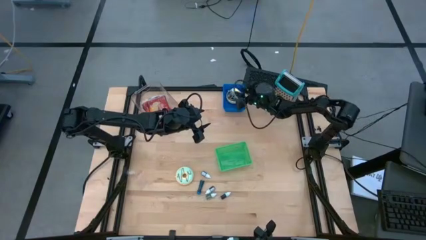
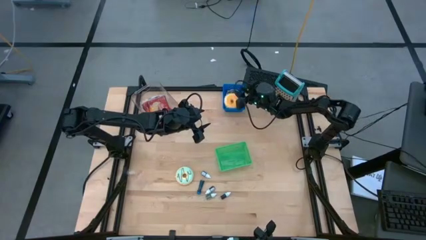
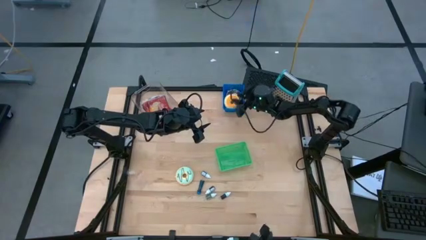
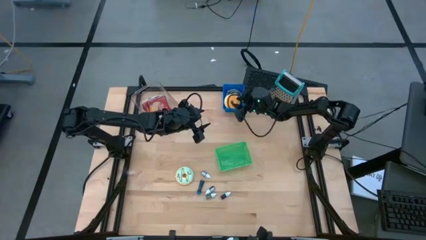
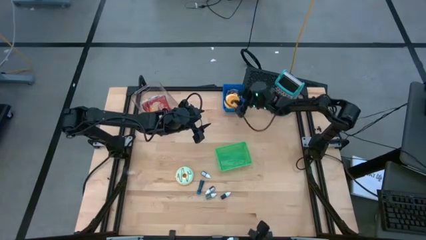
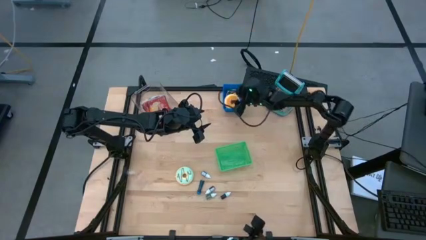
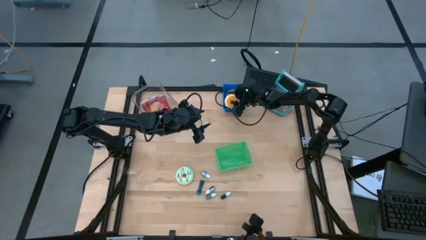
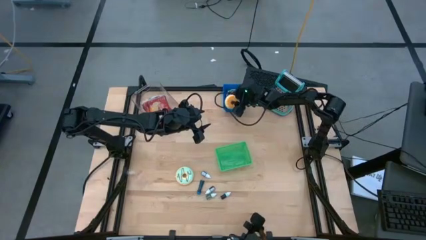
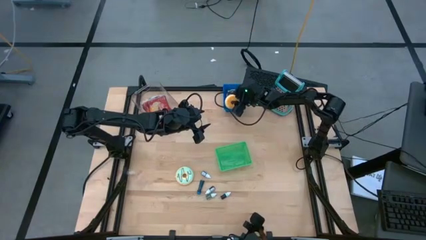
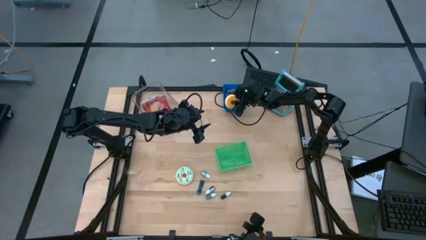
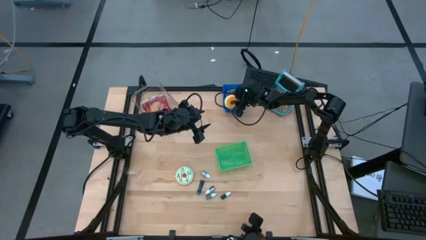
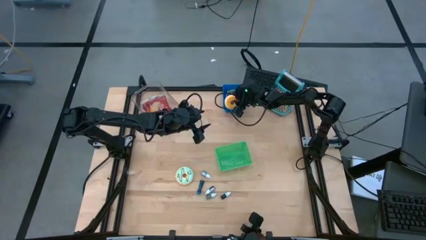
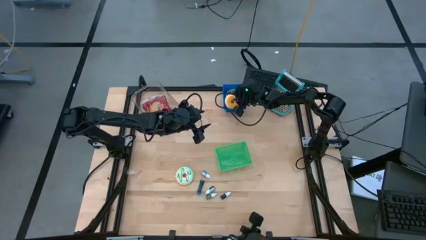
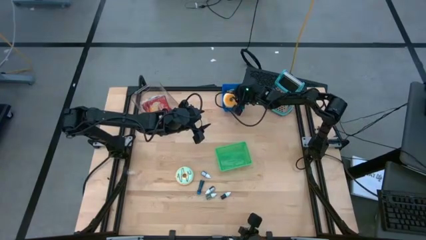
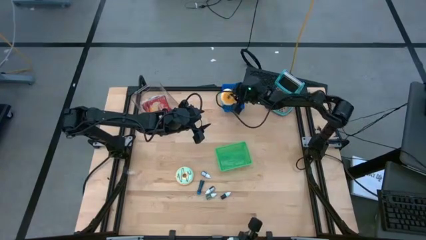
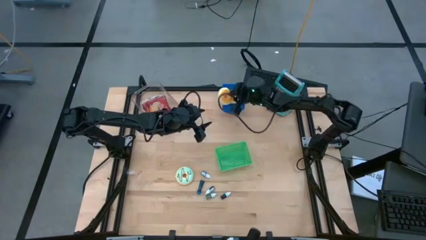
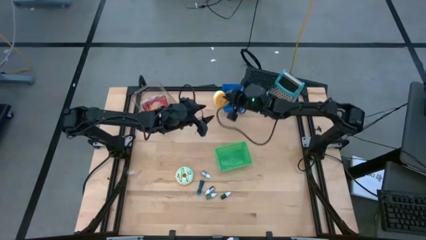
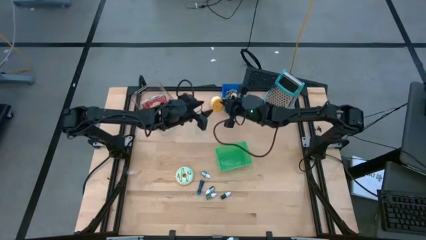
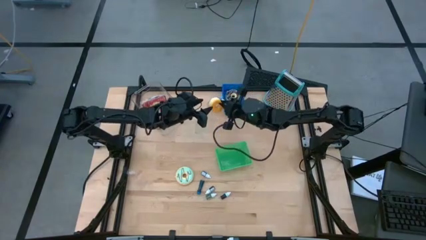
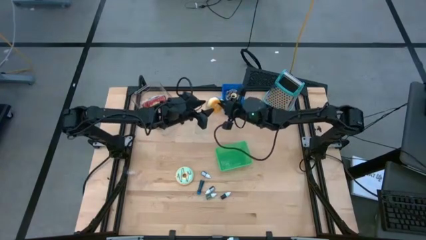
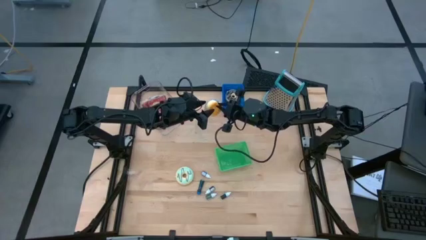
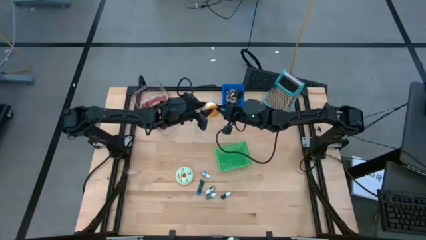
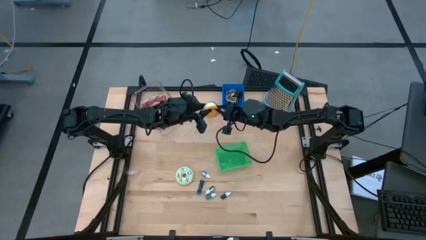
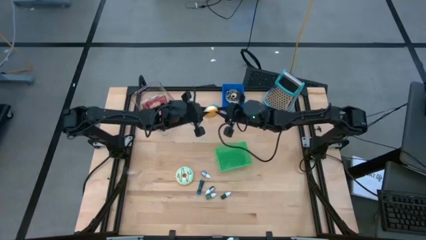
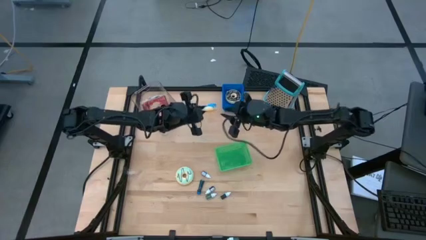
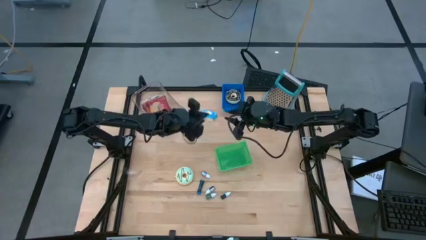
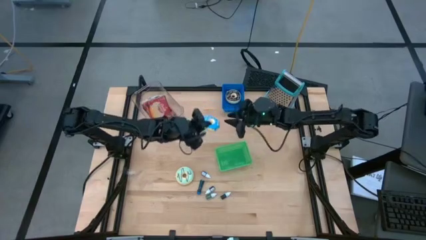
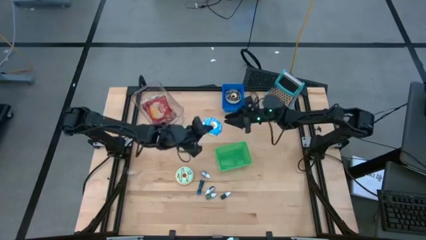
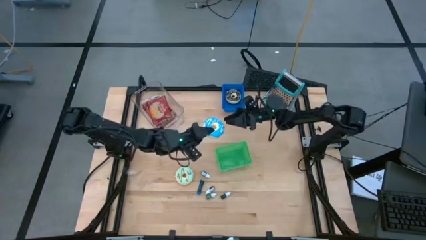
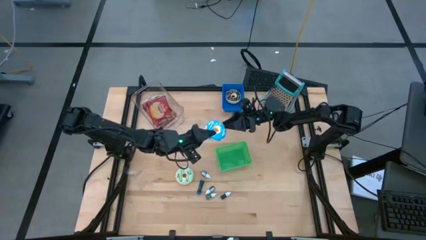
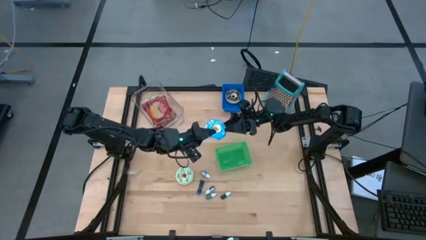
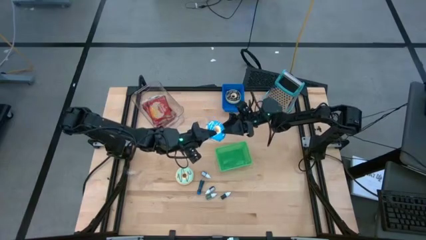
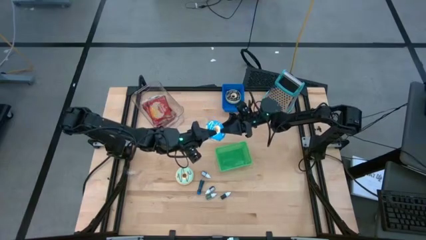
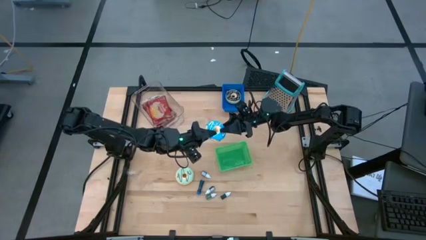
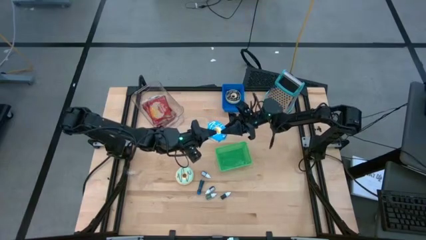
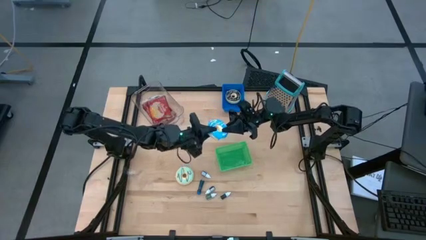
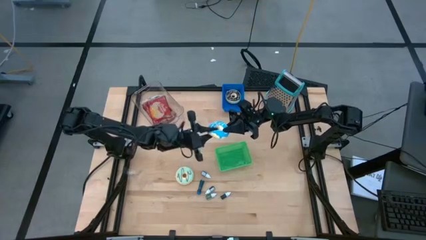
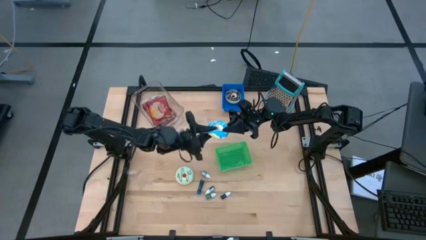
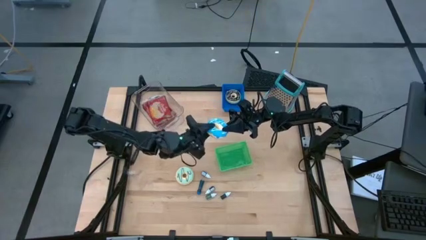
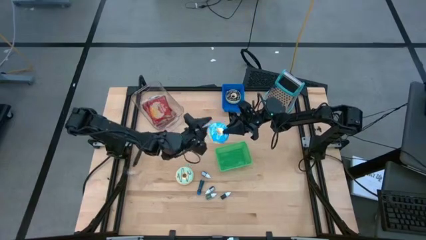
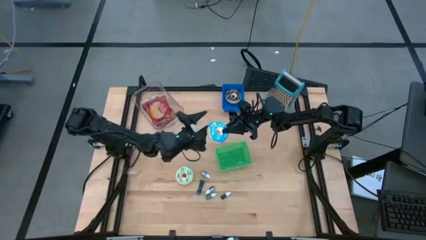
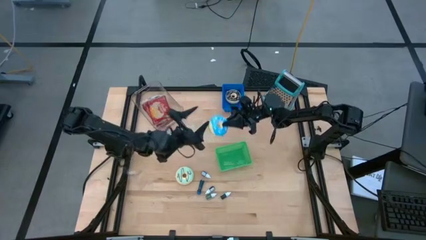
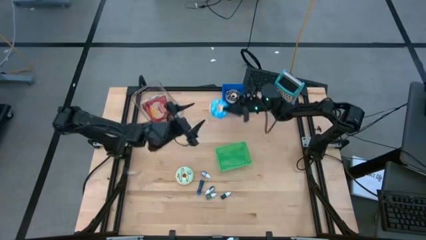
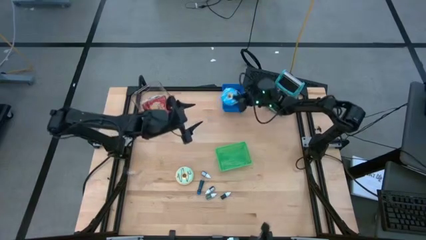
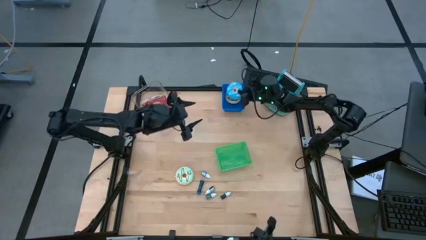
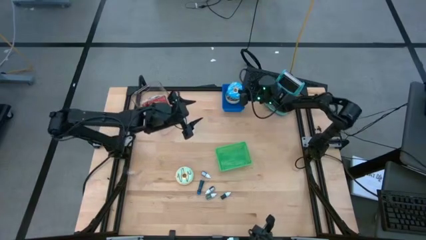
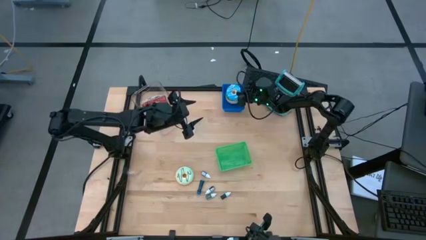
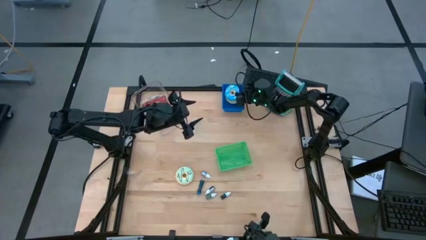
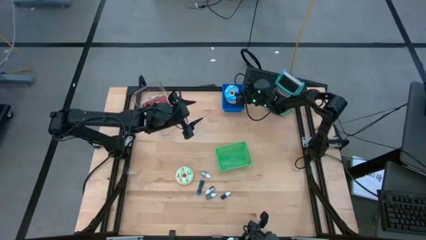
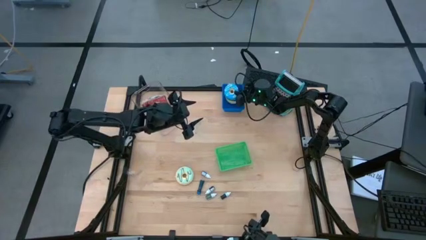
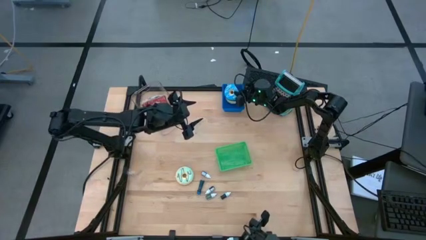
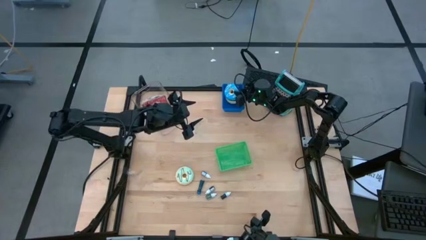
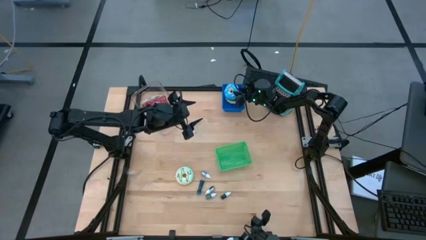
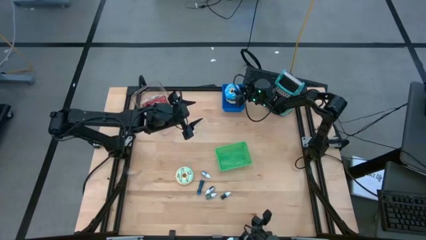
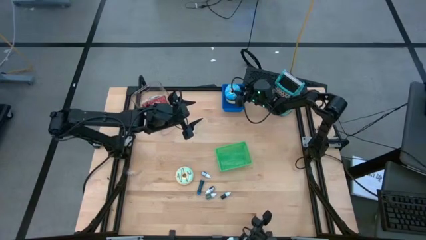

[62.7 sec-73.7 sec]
Put the blue donut into the blue bin

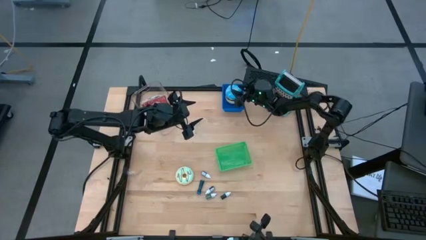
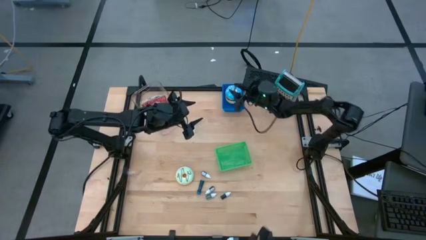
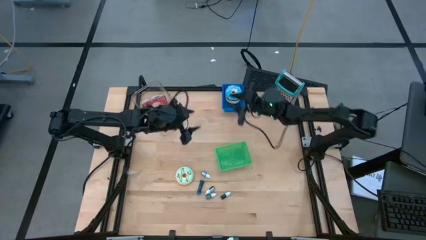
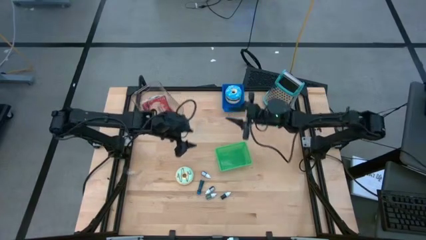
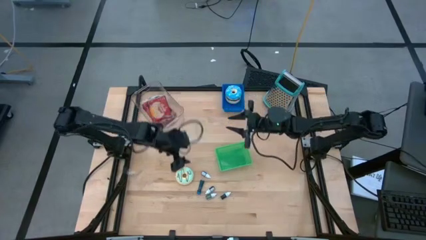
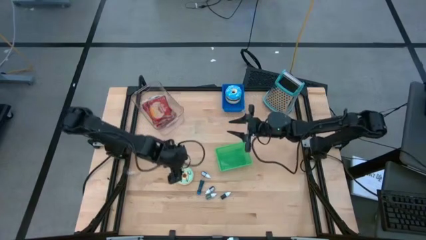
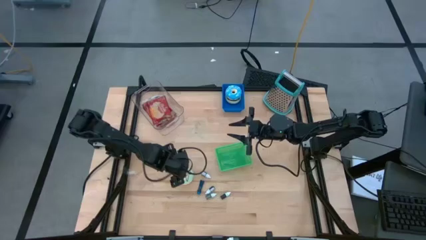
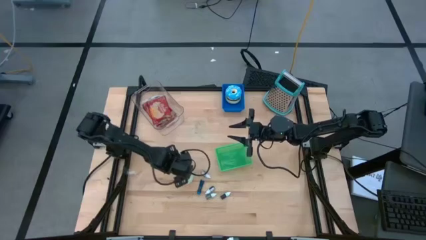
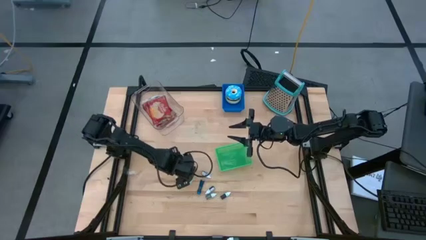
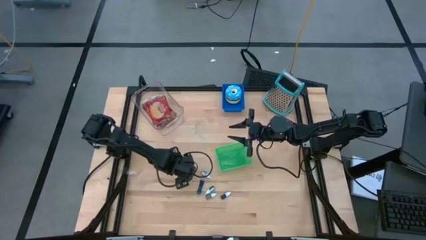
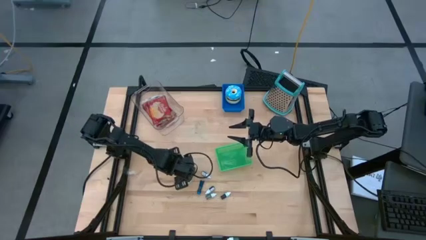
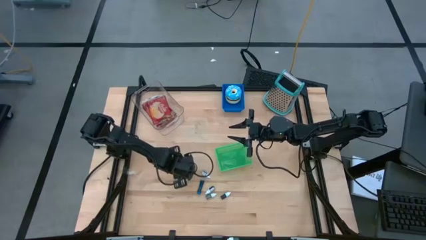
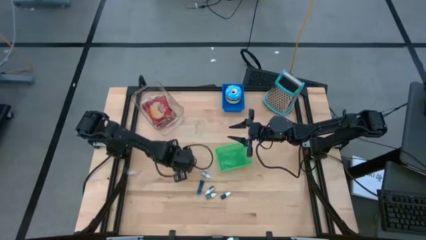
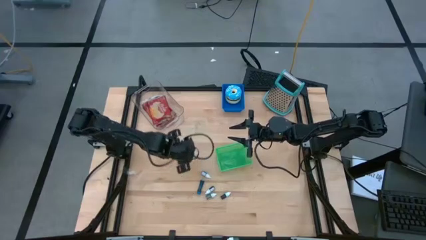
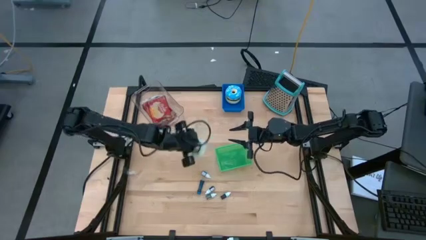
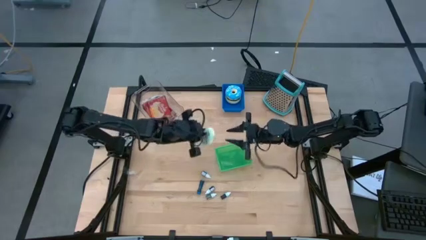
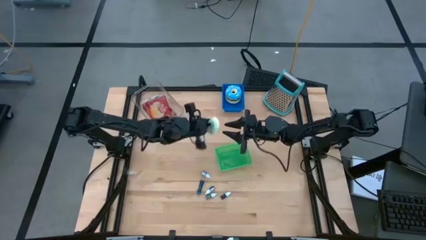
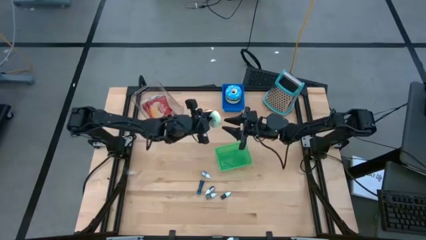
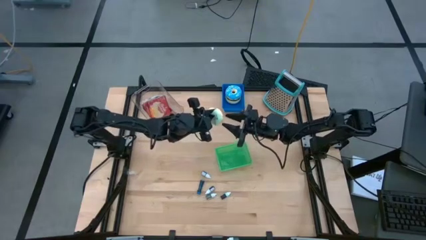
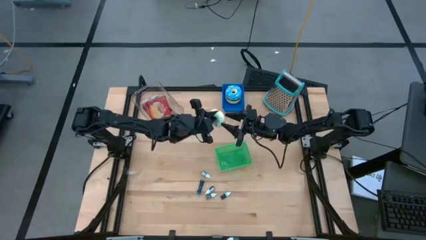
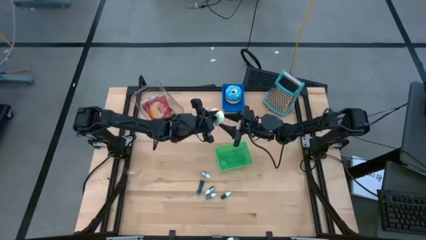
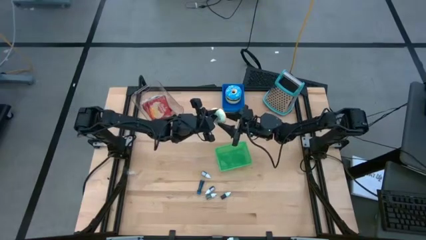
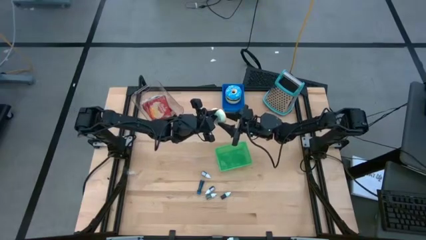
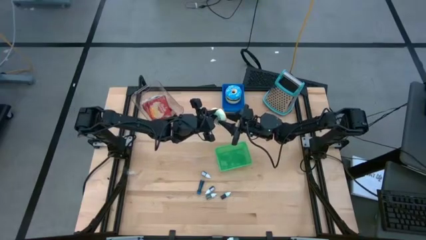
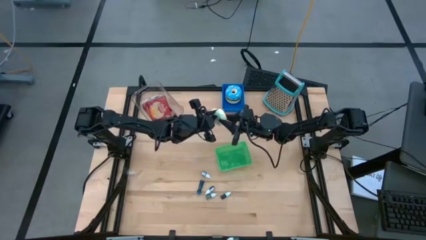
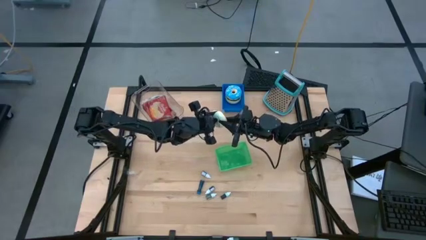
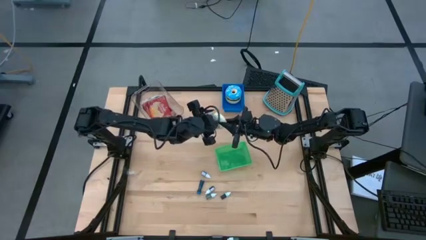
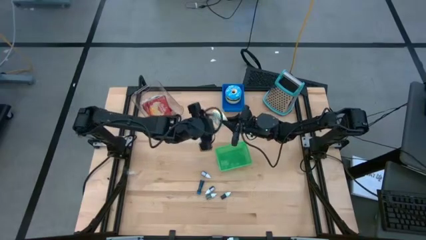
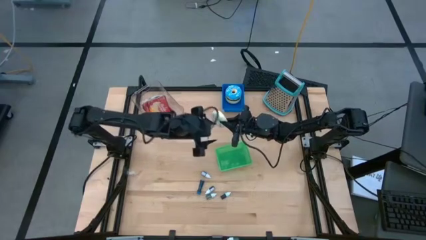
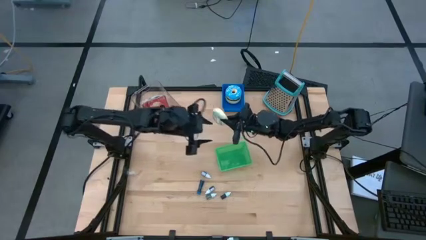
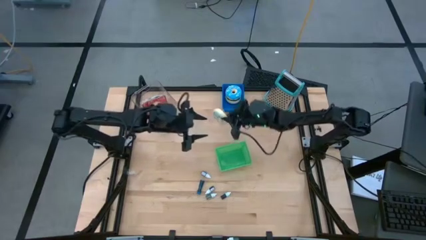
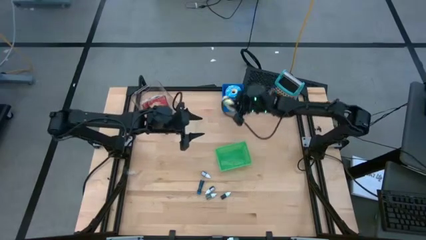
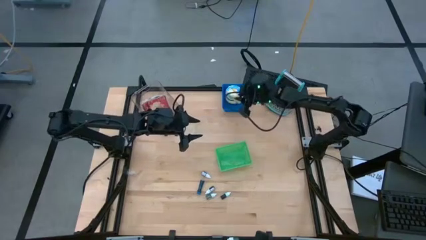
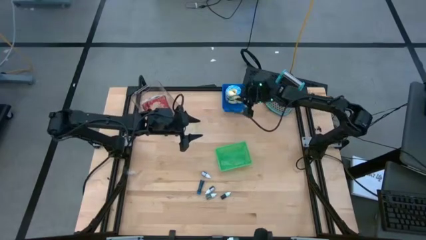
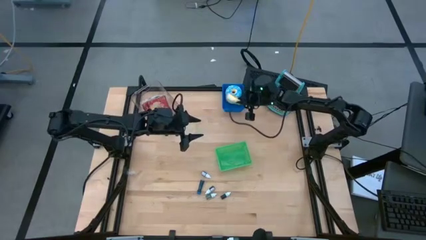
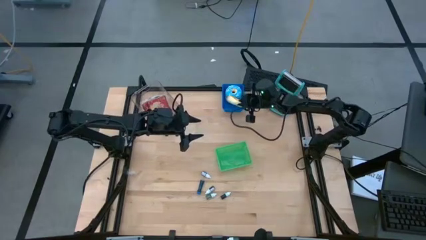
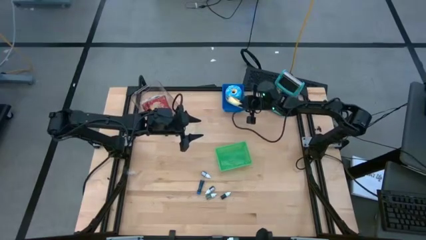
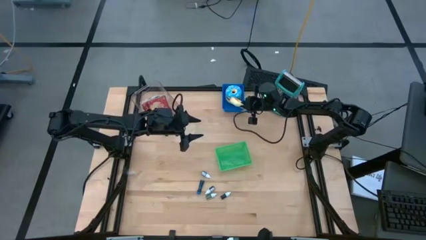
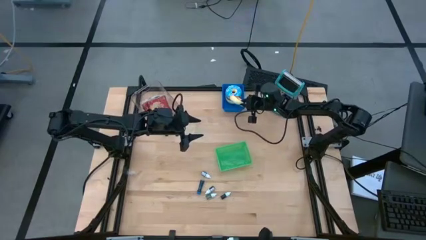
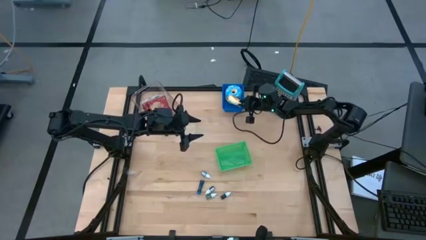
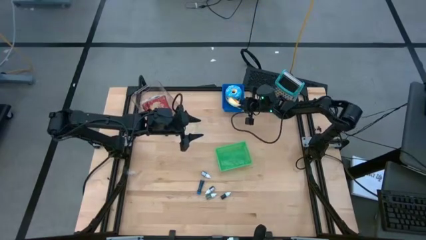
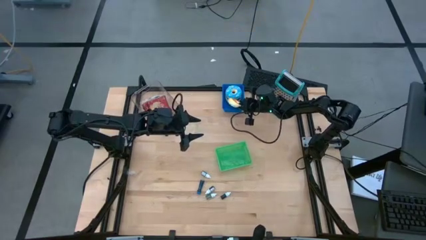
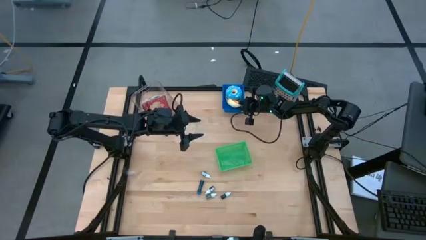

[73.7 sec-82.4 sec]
Put the light blue donut into the blue bin
